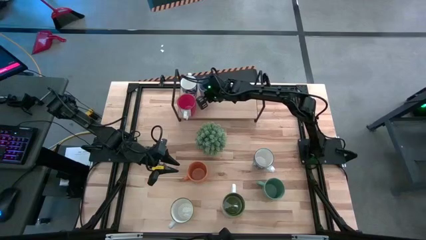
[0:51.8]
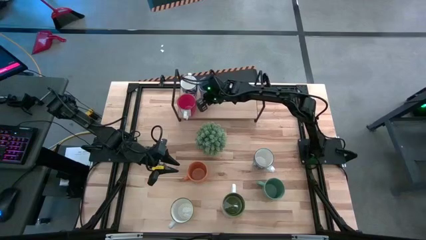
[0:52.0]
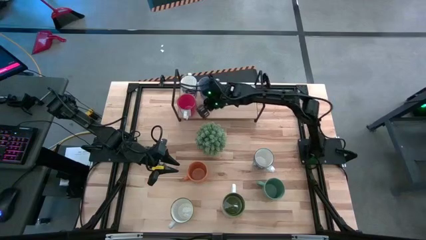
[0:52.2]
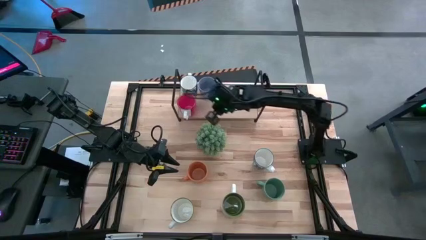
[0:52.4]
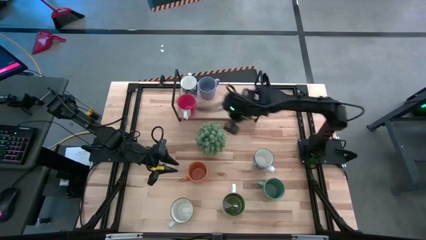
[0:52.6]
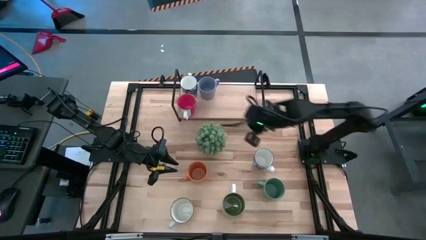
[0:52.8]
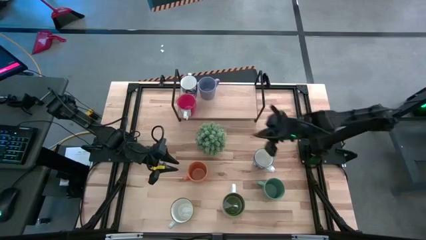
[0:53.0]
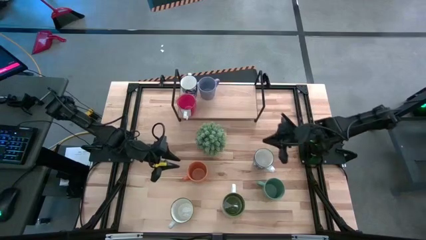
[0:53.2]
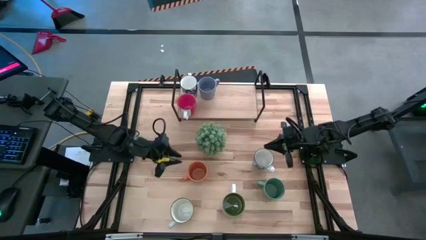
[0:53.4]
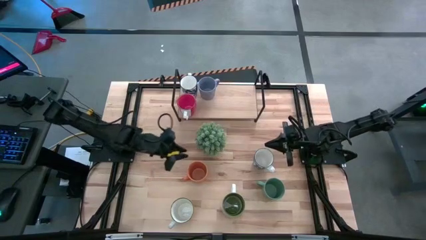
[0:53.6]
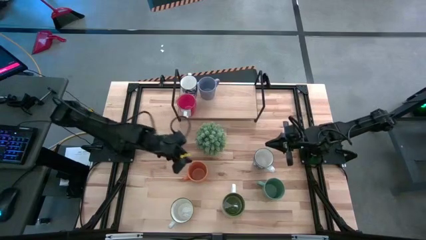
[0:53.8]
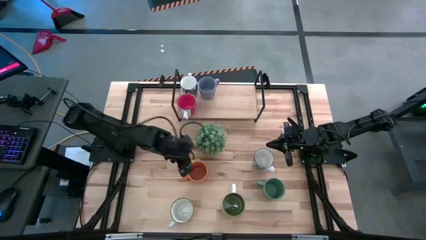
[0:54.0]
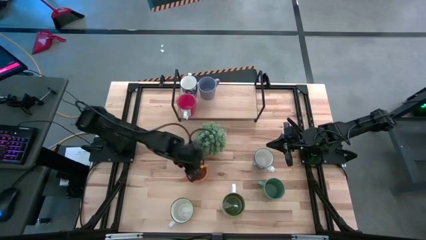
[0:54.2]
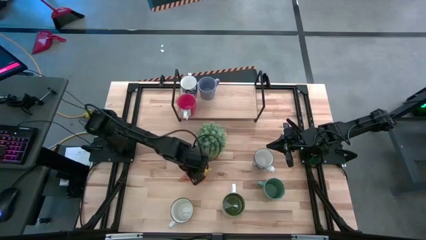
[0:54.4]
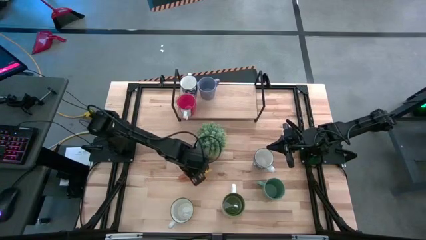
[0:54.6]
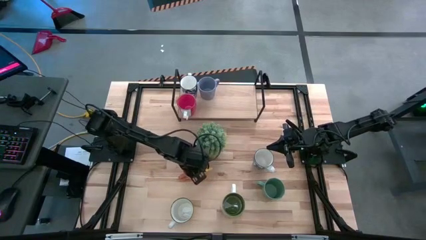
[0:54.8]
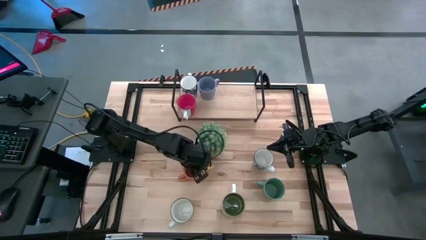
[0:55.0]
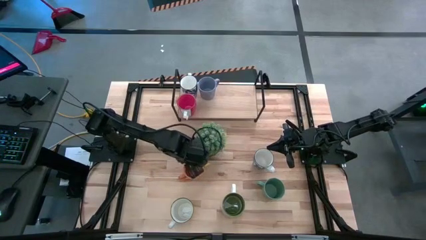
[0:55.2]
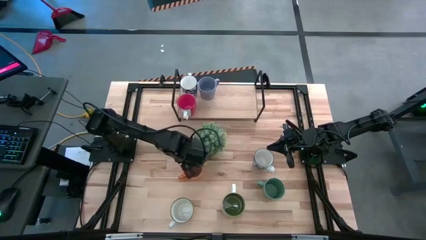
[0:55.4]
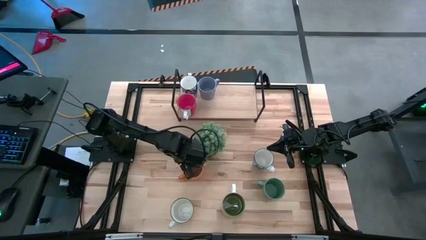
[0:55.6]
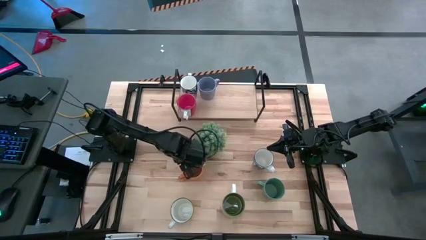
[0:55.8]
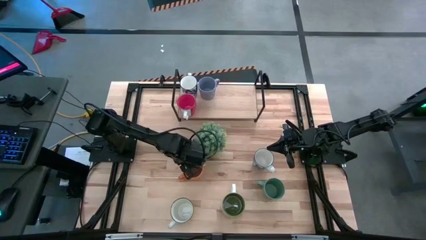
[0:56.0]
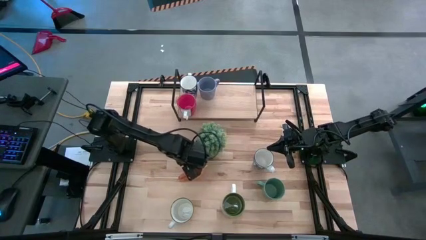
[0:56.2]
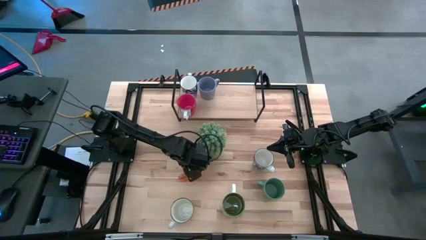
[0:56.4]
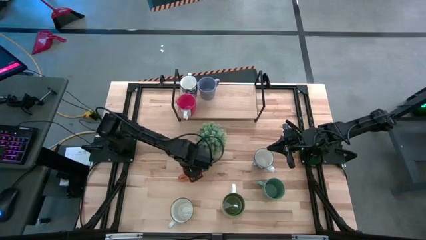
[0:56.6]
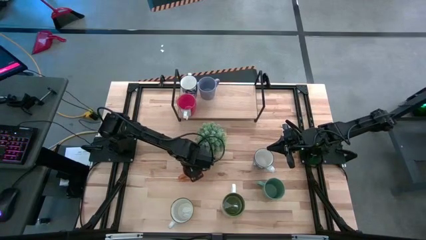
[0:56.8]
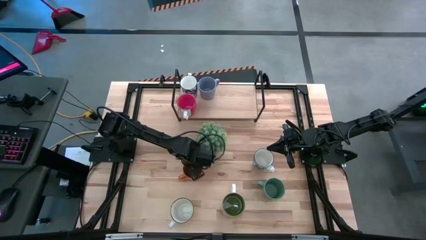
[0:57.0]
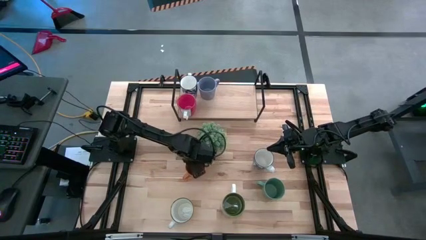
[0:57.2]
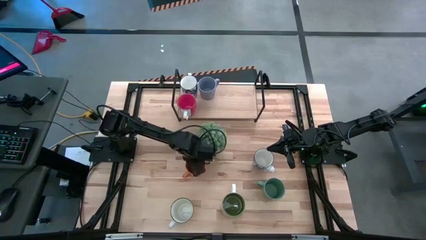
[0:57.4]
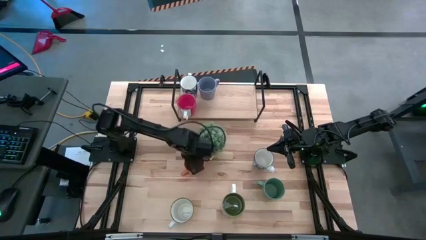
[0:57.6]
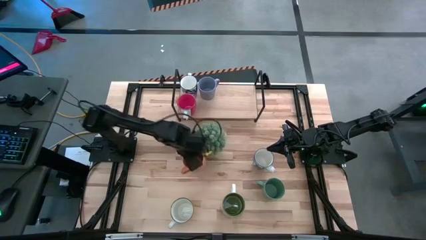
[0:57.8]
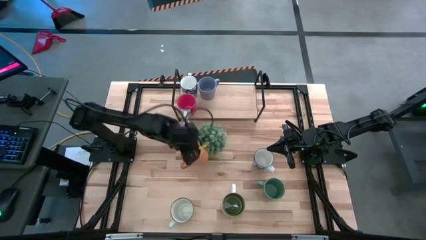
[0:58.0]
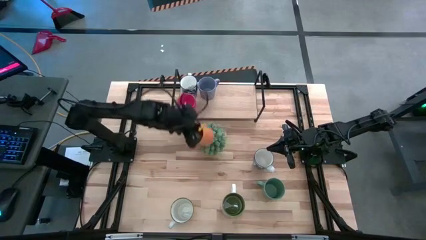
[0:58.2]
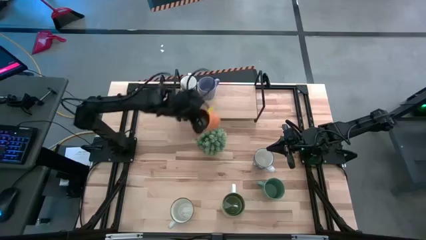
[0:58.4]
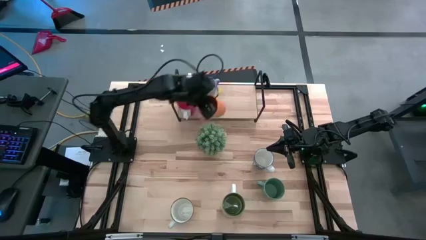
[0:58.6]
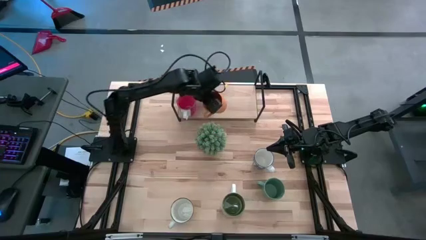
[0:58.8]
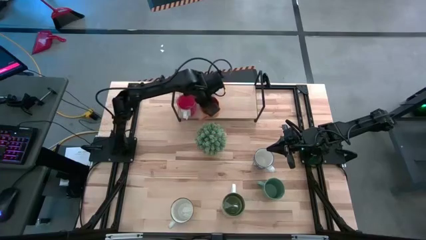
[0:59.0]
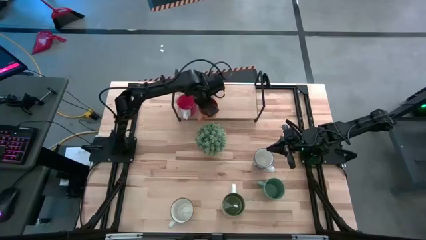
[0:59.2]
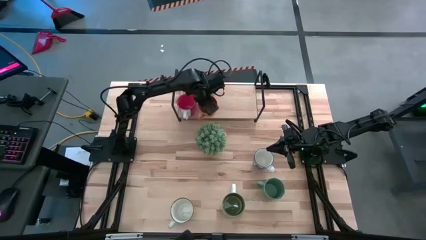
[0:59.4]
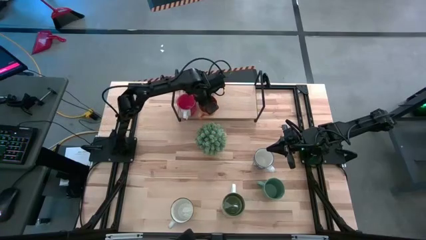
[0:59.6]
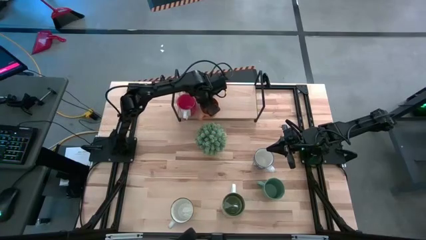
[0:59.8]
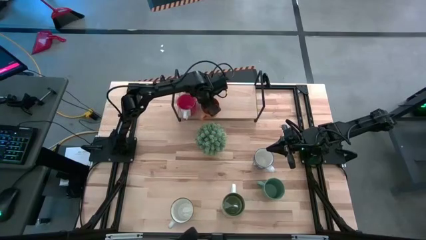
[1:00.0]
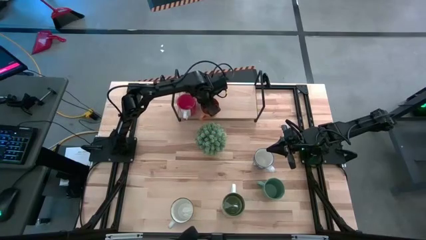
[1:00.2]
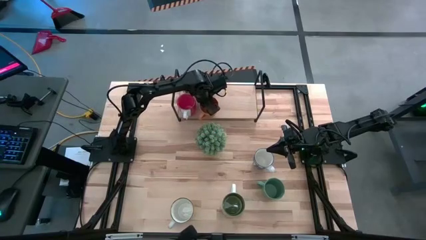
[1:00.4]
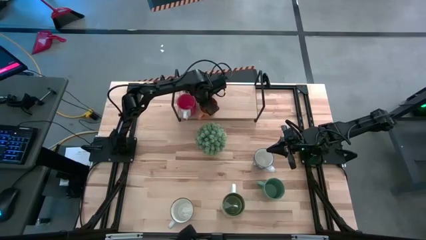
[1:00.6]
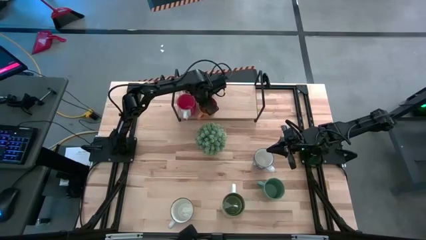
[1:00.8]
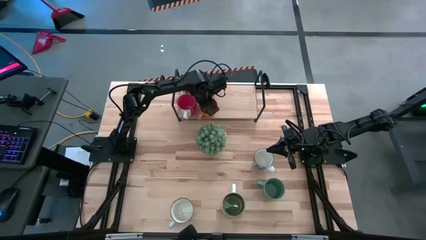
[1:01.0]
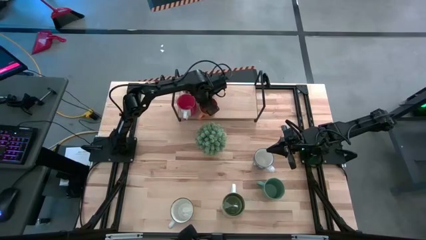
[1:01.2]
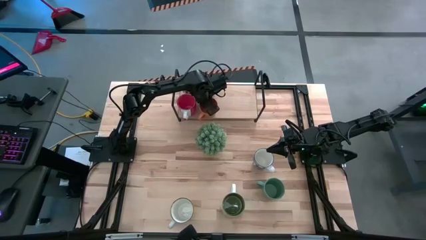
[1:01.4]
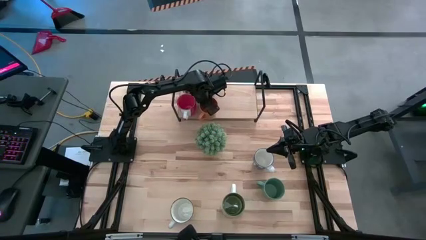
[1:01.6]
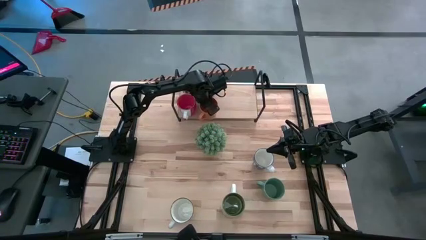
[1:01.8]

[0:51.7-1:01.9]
Task: Place coffee mugs
Put the orange mug on the shelf
